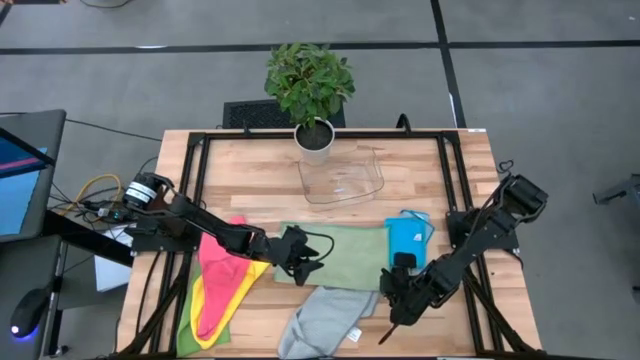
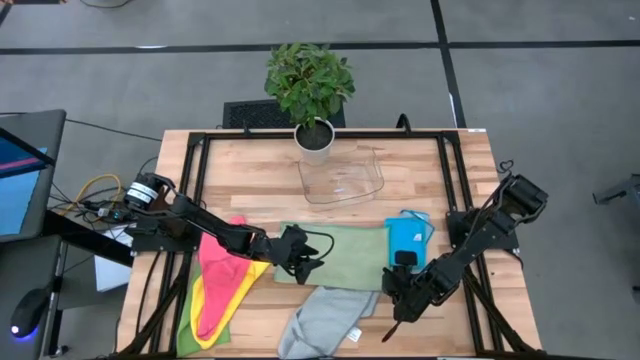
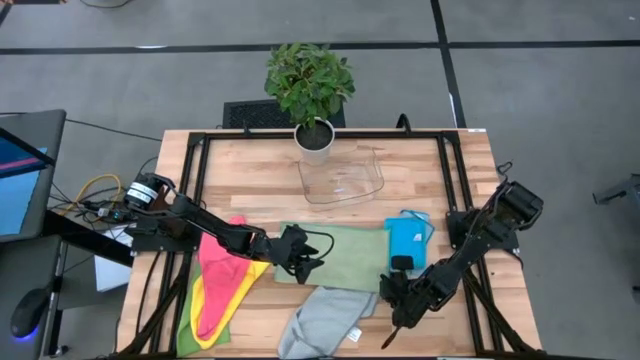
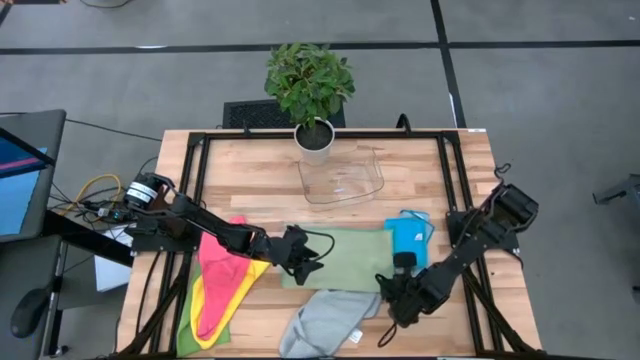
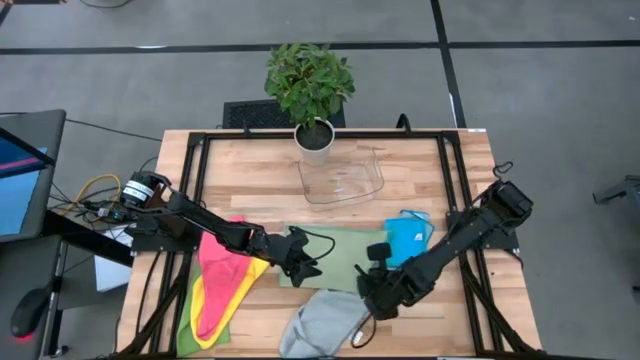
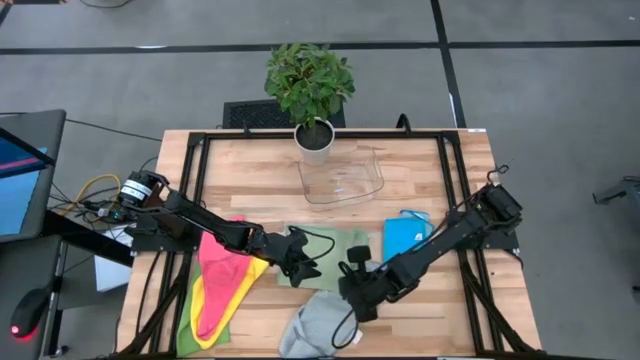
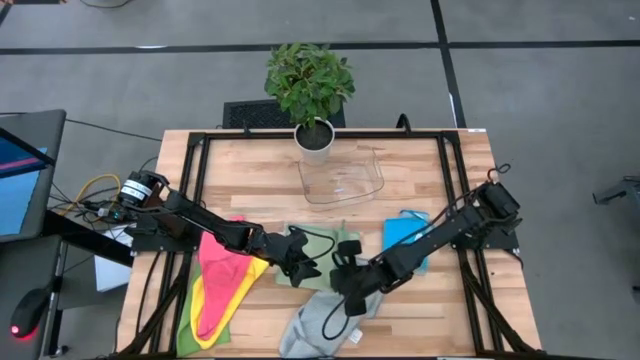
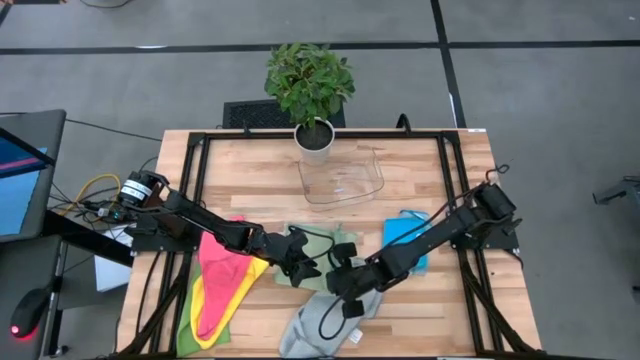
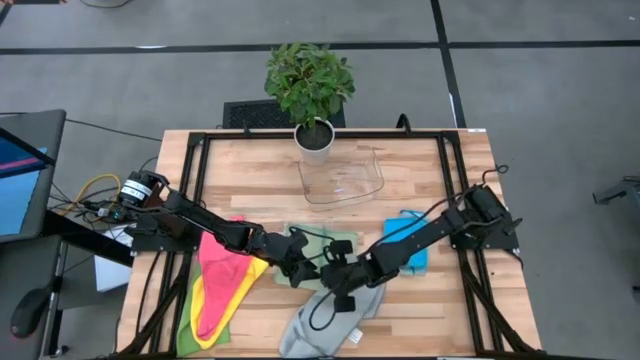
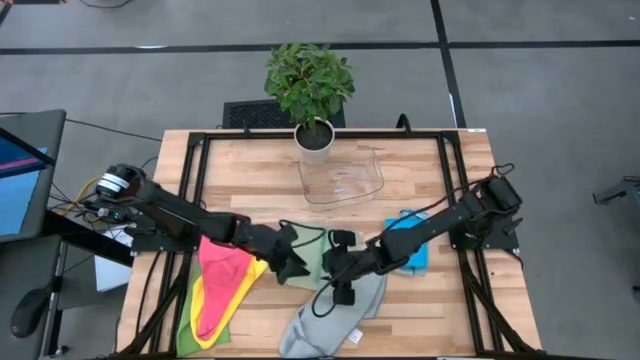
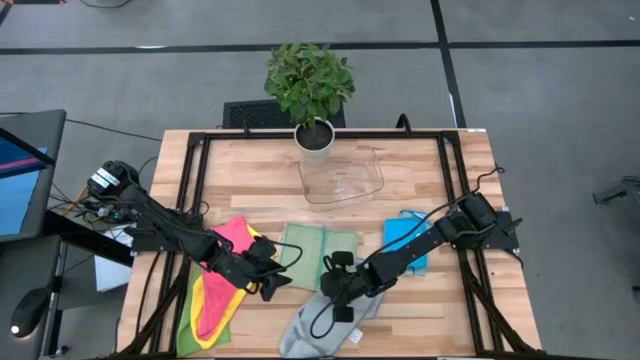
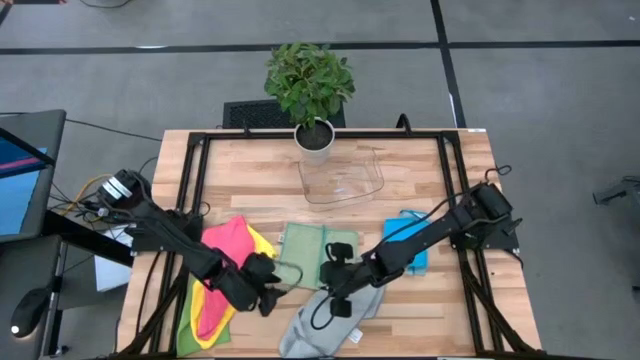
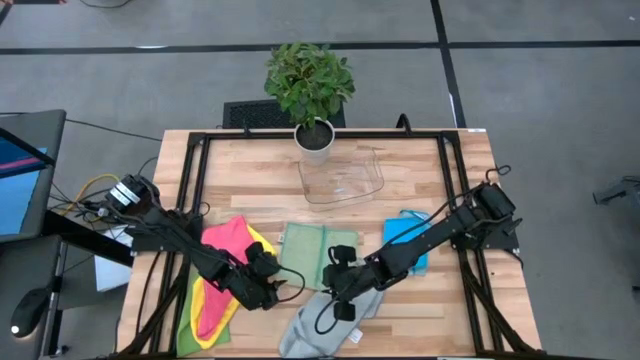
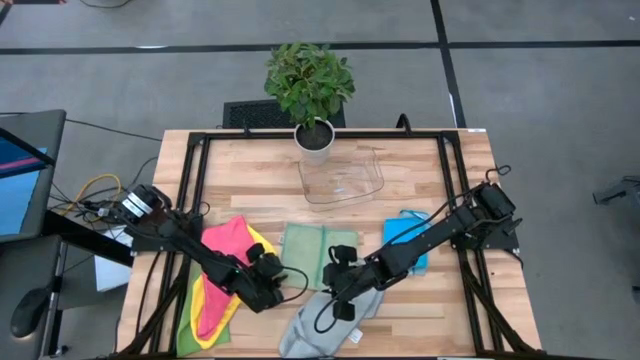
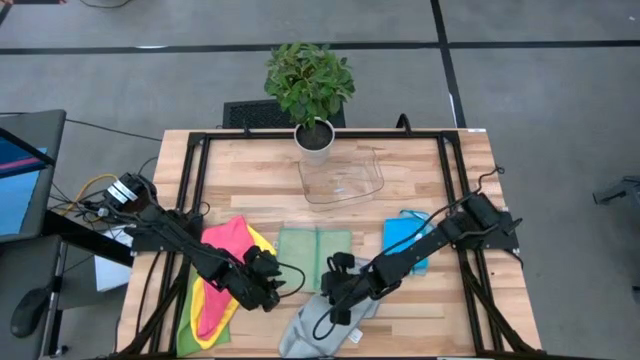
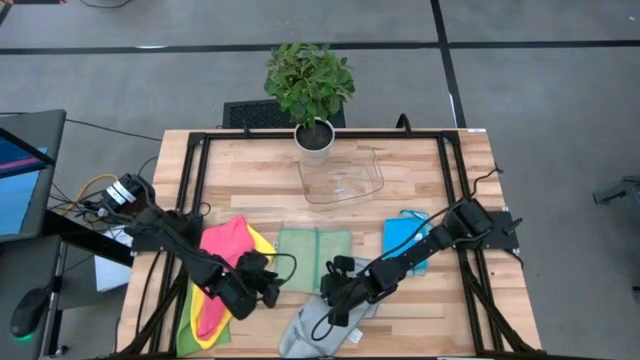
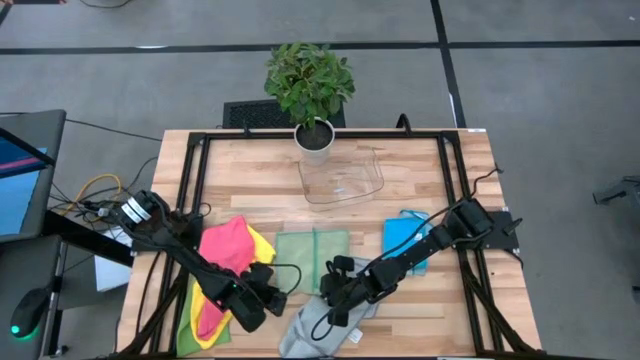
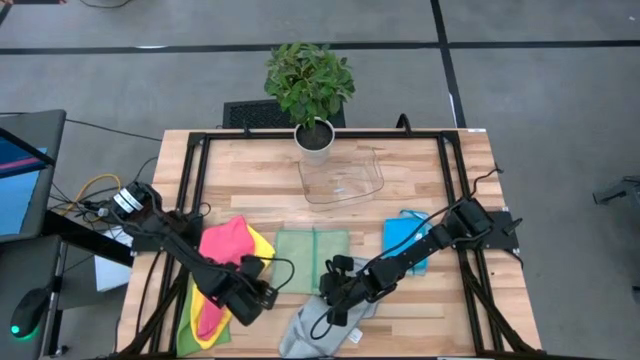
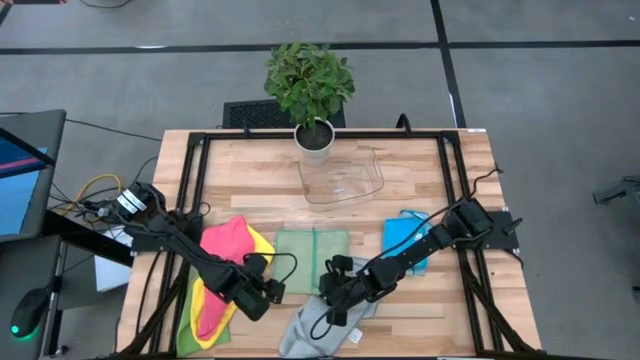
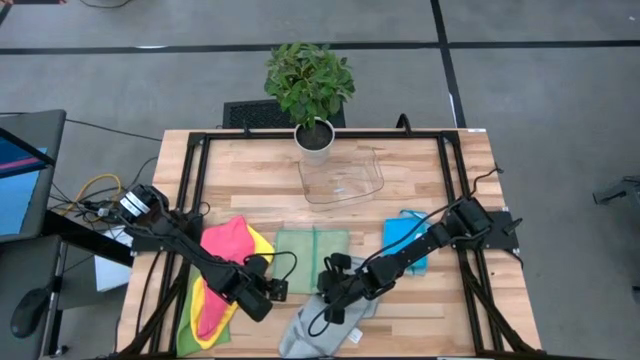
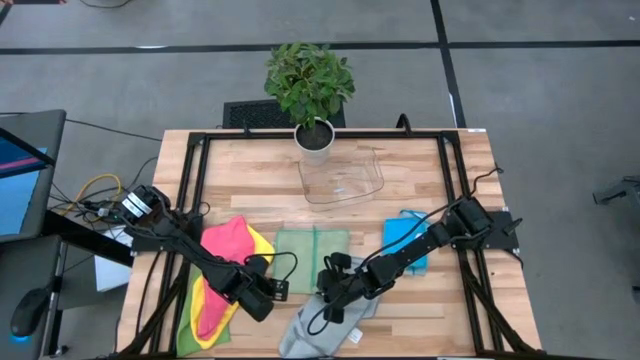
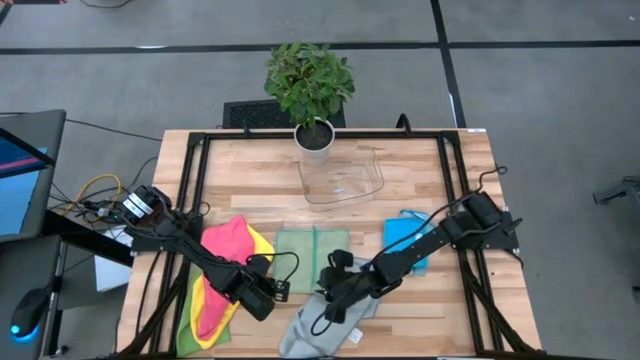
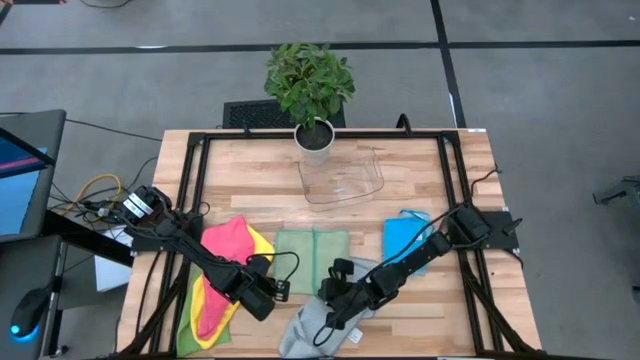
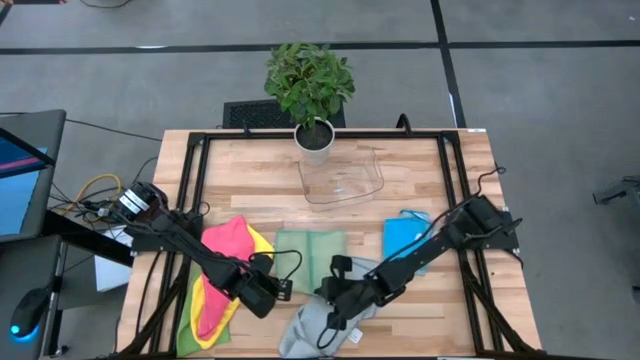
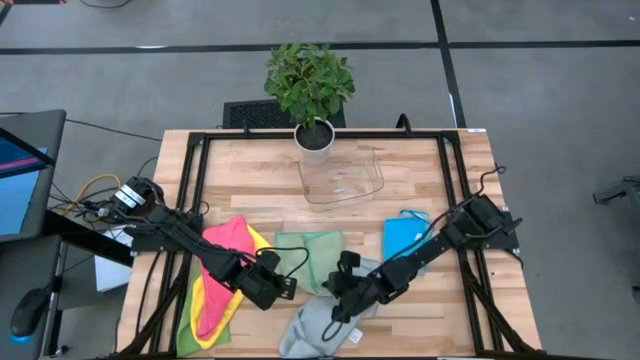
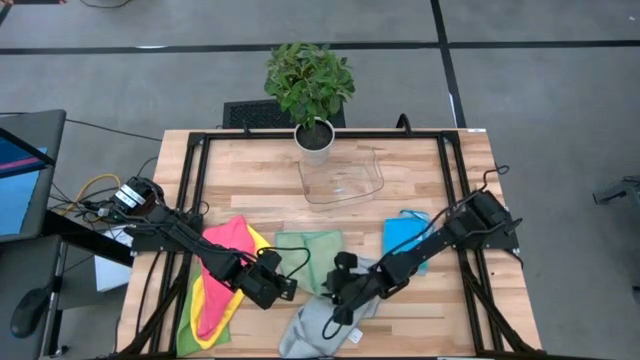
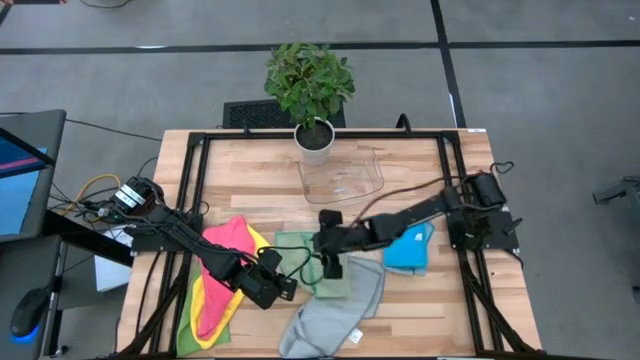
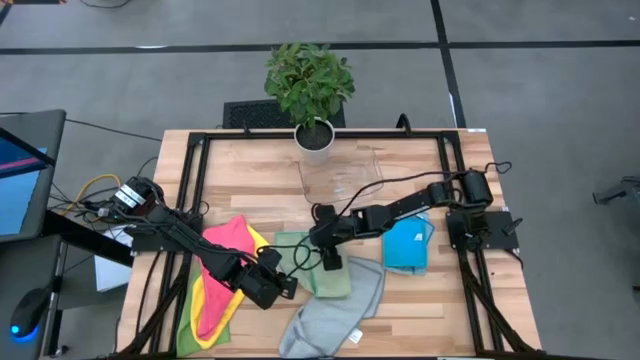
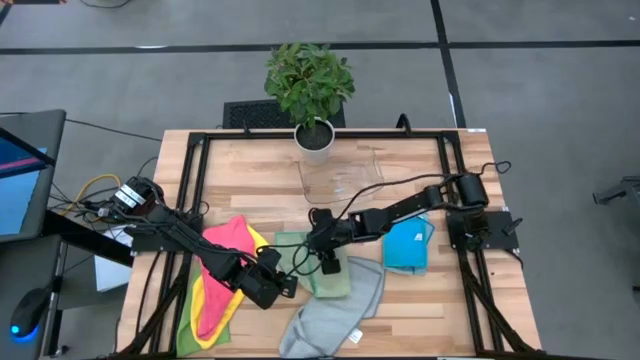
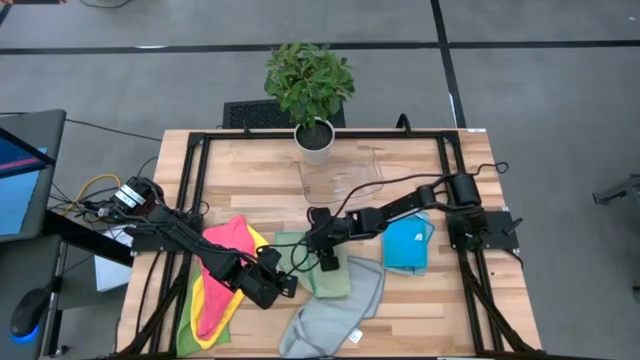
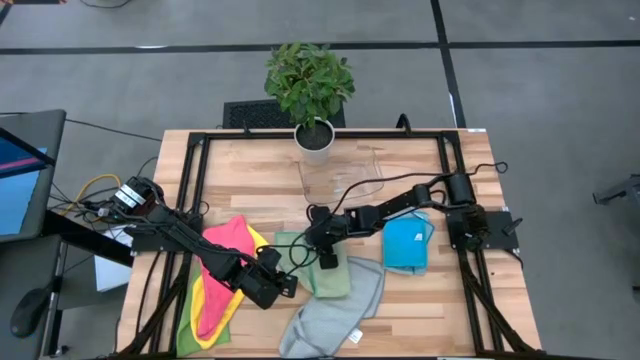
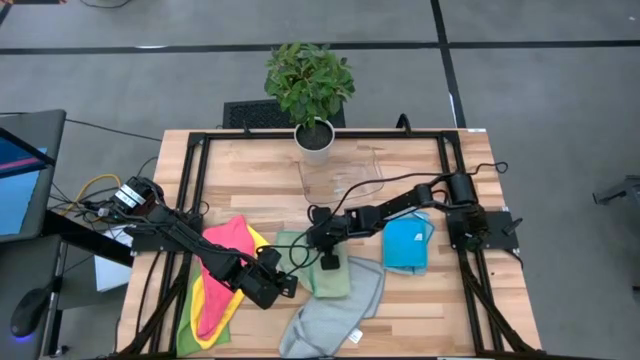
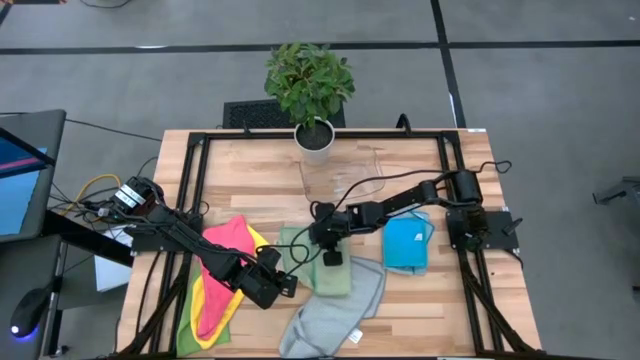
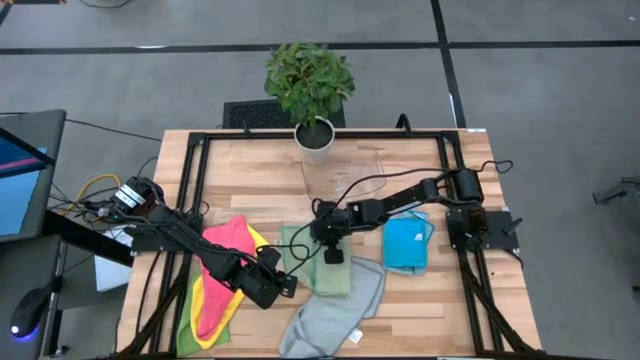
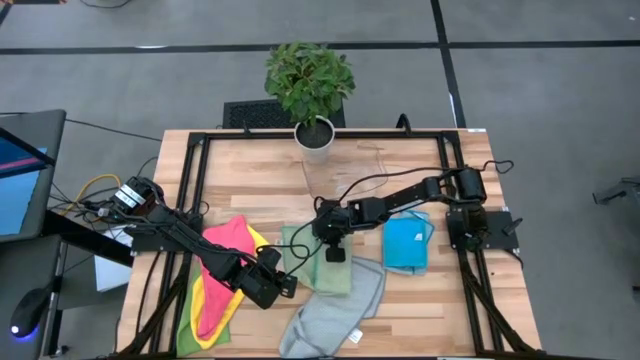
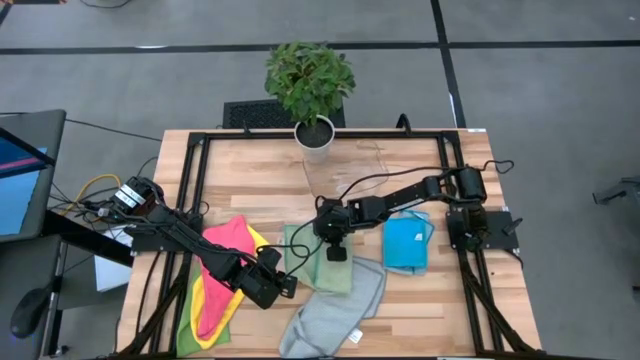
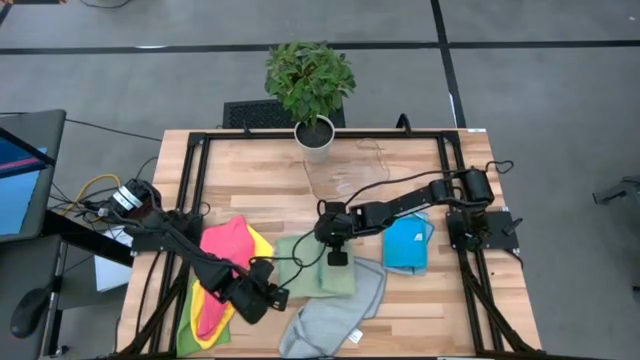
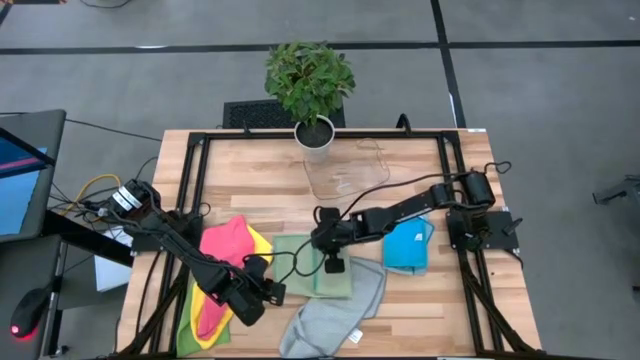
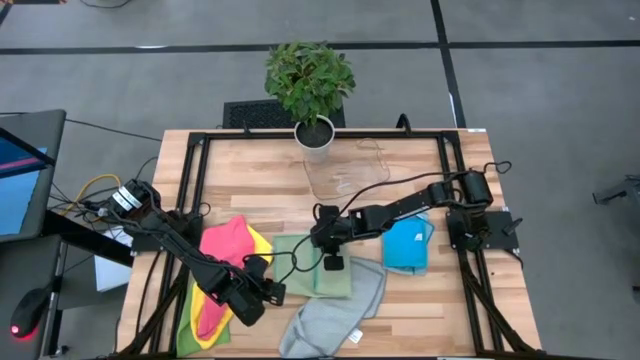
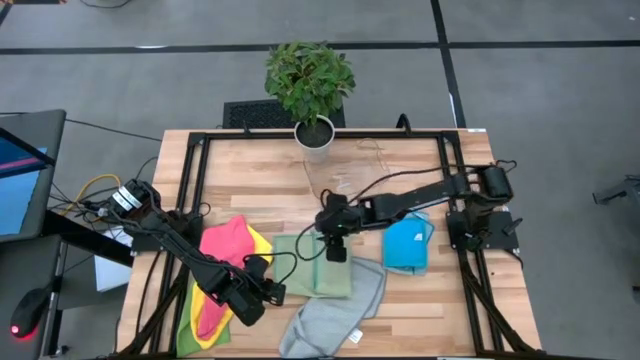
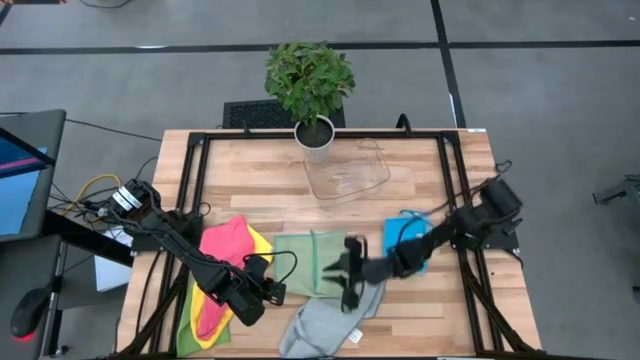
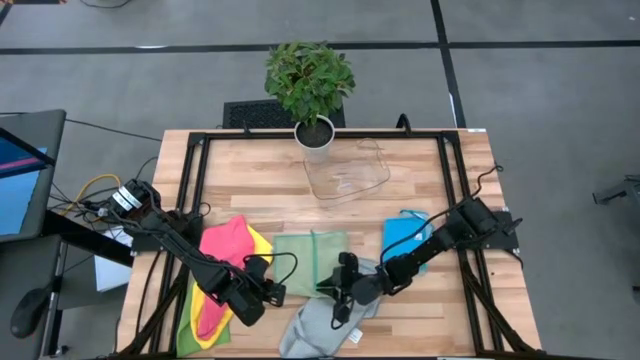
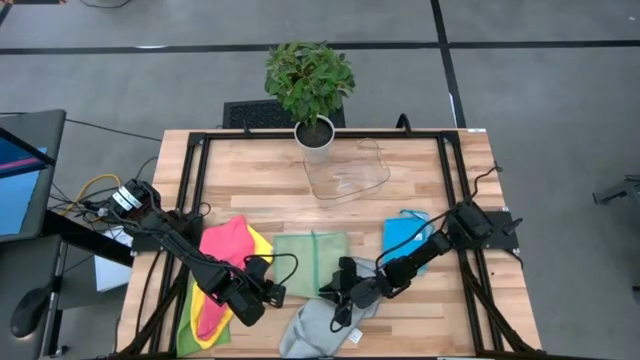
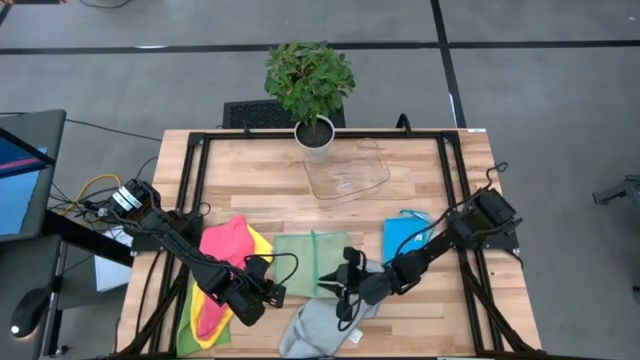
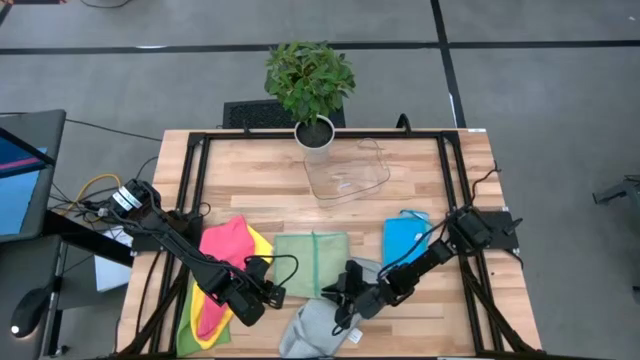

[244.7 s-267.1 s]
Task: Fold microfiber towels
Fold the light green microfiber cloth
